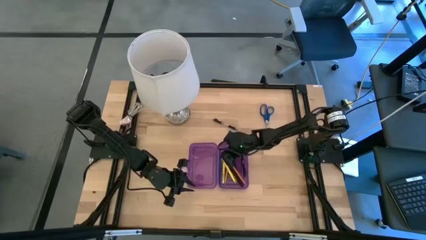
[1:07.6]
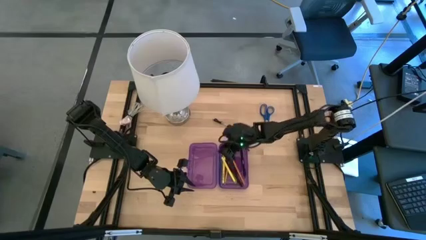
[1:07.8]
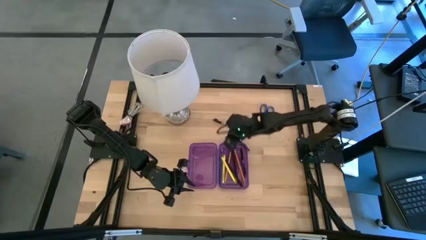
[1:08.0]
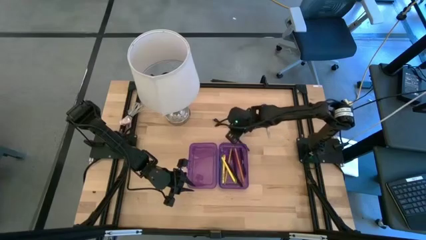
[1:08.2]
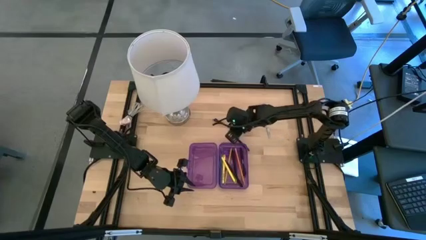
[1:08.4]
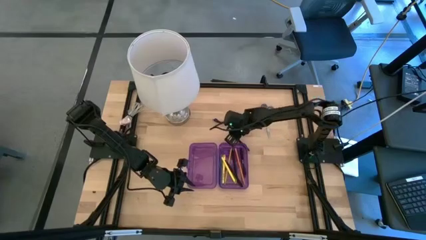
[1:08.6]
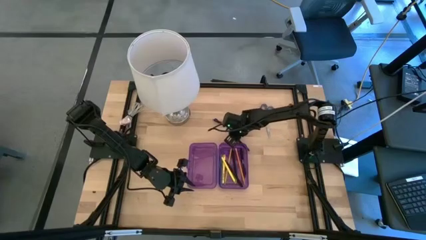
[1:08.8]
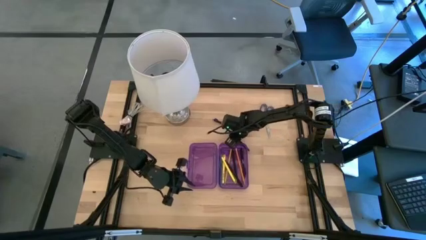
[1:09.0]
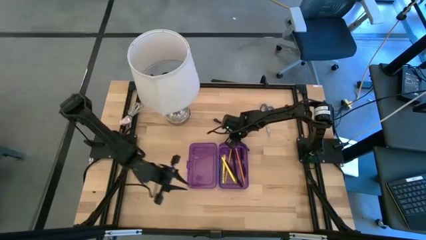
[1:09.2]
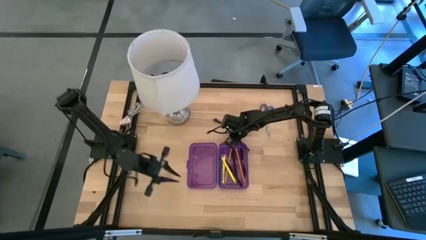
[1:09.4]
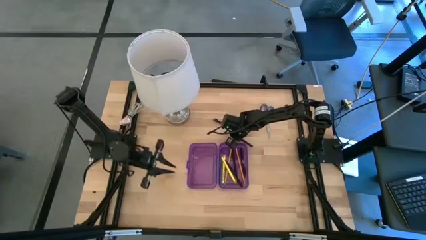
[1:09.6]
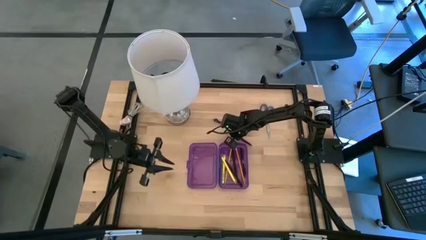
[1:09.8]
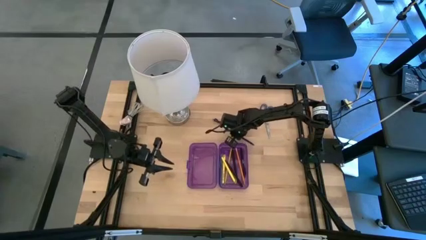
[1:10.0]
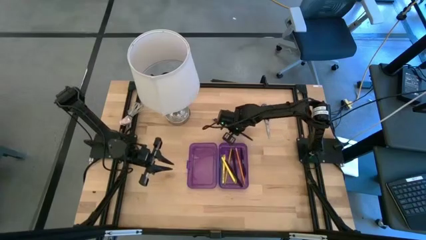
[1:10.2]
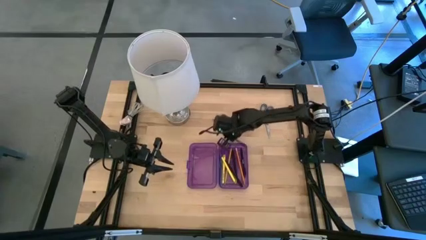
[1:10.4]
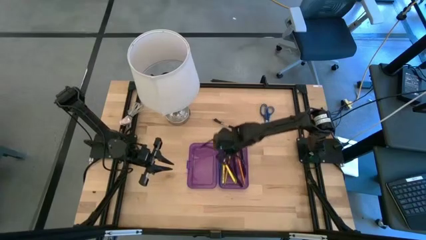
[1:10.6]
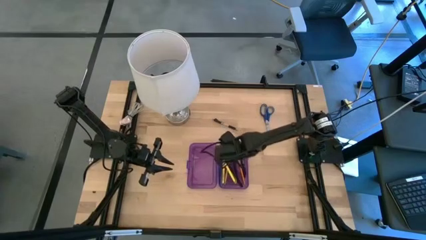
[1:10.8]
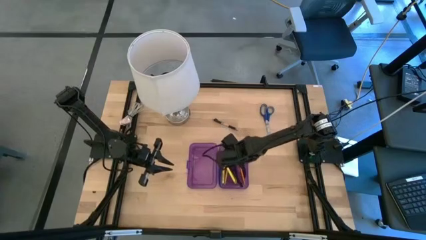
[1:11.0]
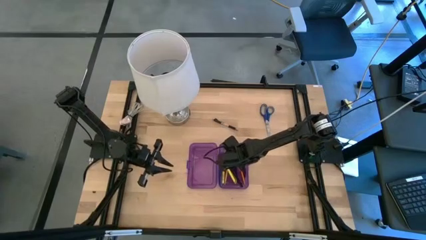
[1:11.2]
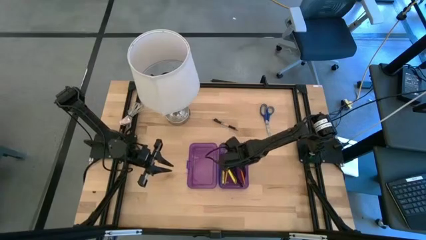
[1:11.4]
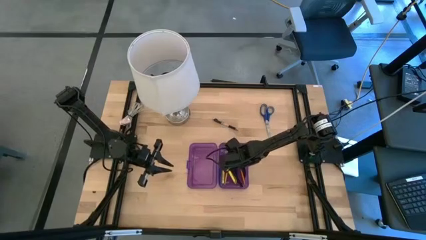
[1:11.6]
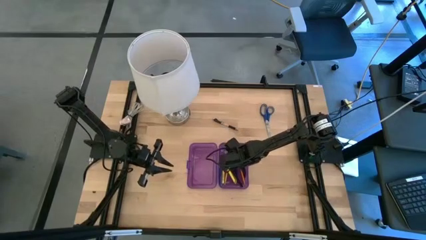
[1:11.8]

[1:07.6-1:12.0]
Task: Pick & place school supplies into a supply box
Put the black pen into the purple supply box

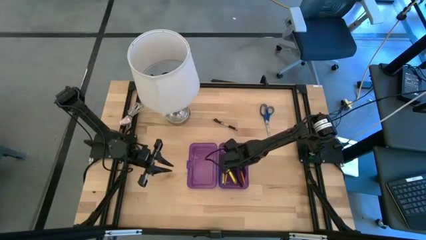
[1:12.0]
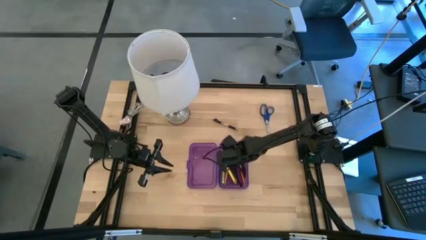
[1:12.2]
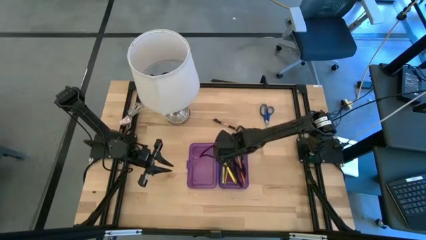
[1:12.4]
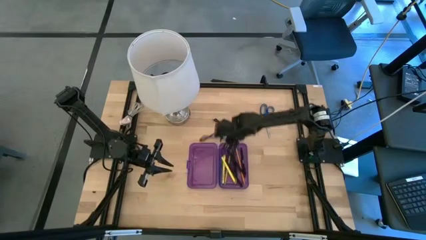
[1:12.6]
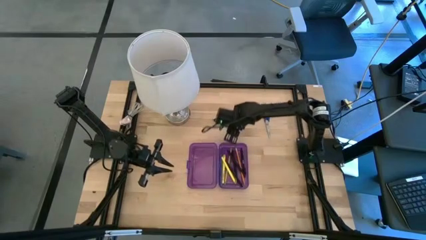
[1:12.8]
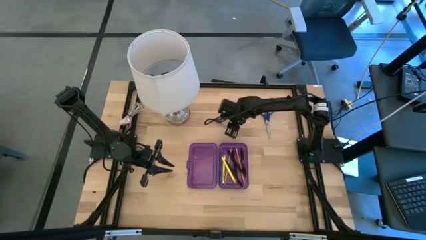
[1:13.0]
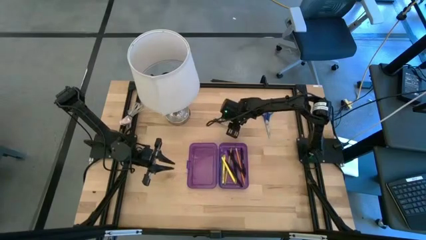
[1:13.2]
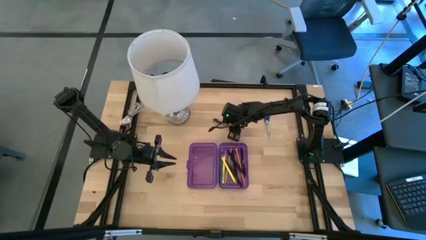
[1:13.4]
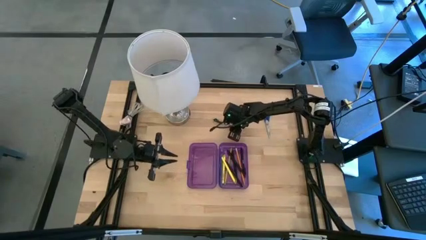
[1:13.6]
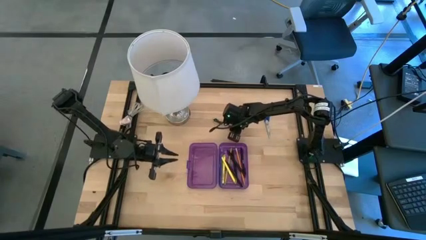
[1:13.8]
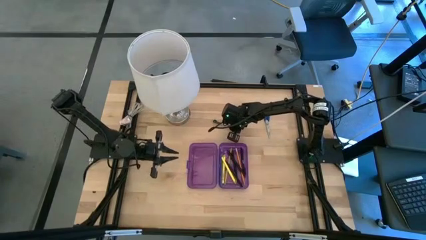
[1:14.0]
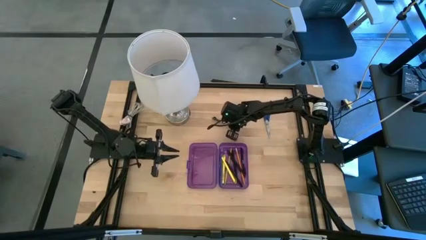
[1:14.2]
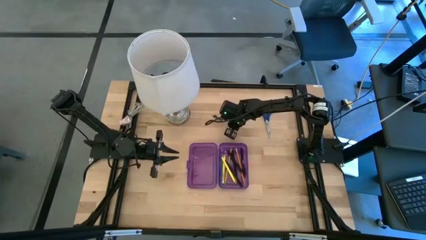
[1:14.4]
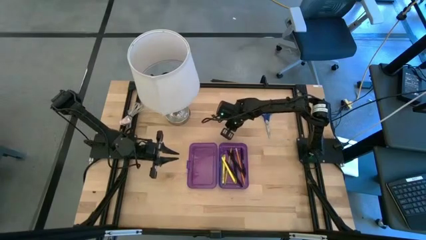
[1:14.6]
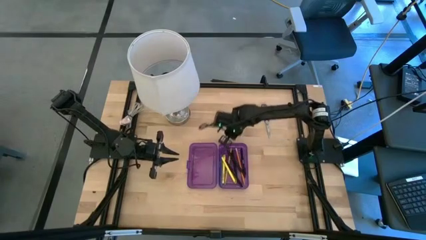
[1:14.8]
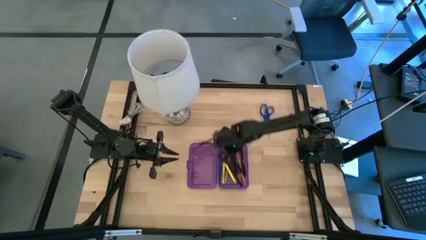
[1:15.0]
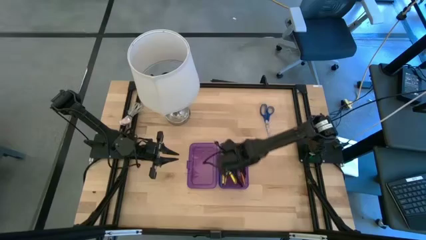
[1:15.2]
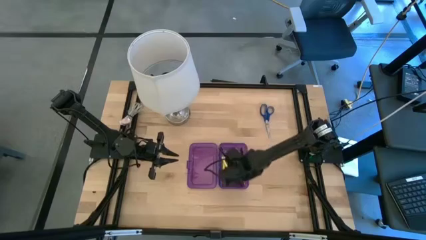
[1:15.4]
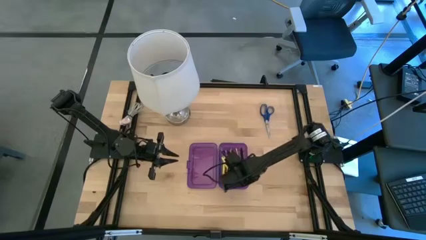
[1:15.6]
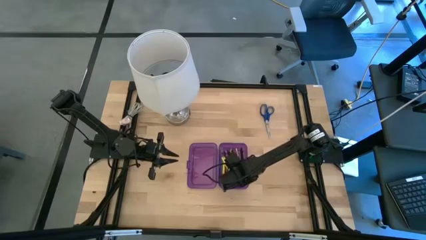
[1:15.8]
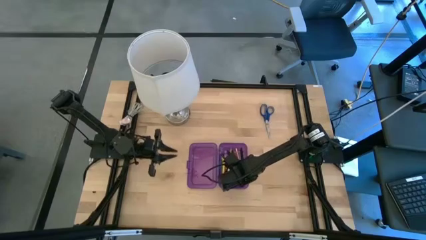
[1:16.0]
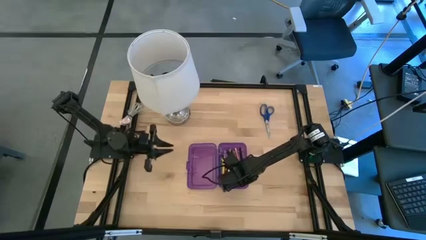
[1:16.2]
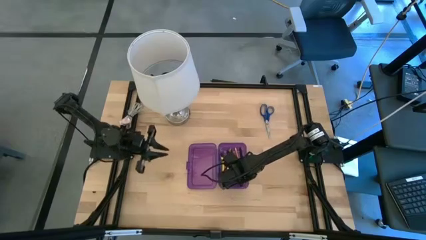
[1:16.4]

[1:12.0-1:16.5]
Put the transparent pen into the purple supply box

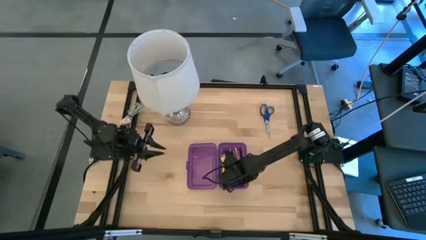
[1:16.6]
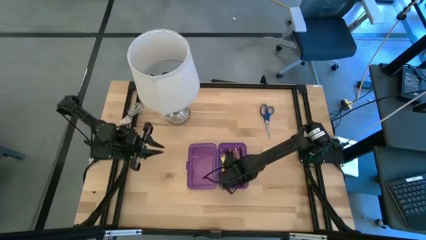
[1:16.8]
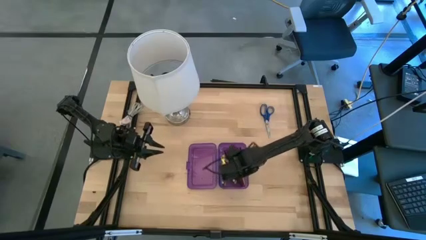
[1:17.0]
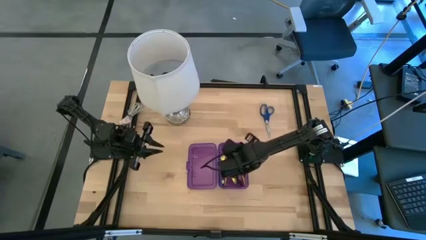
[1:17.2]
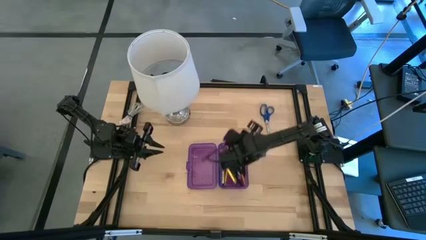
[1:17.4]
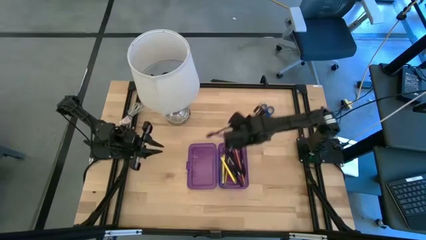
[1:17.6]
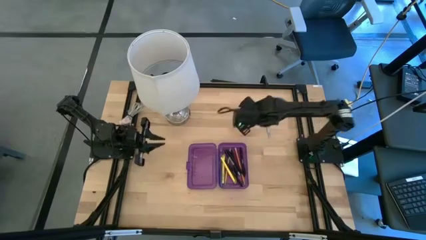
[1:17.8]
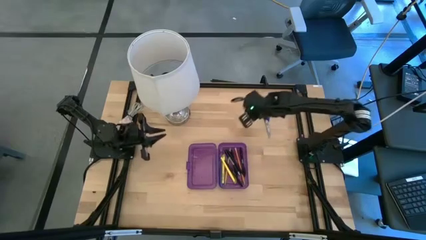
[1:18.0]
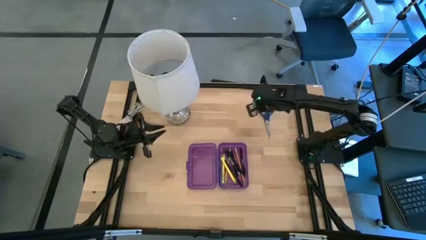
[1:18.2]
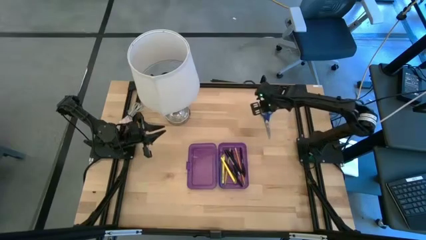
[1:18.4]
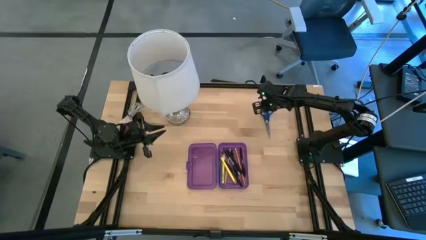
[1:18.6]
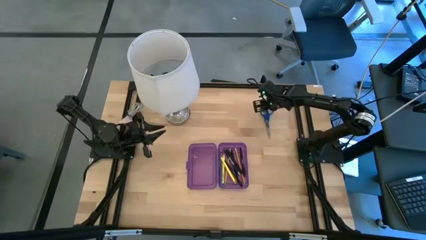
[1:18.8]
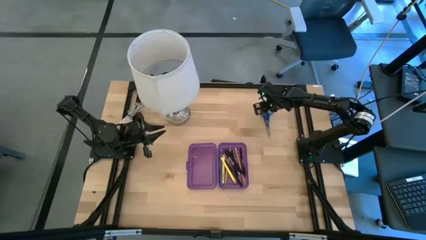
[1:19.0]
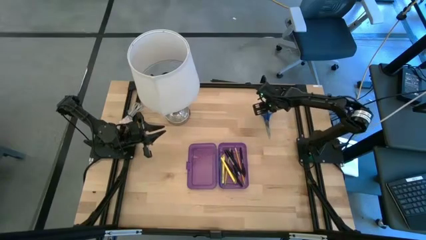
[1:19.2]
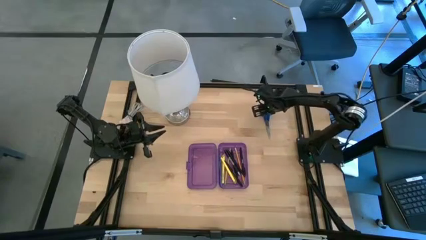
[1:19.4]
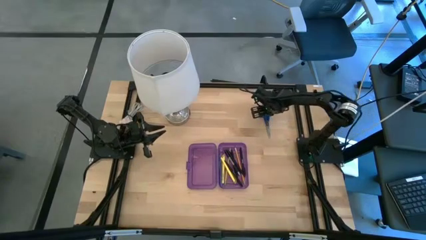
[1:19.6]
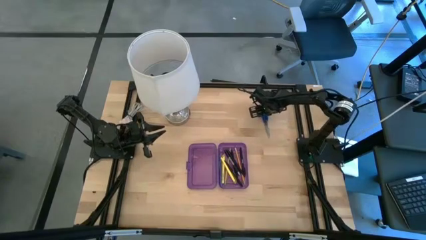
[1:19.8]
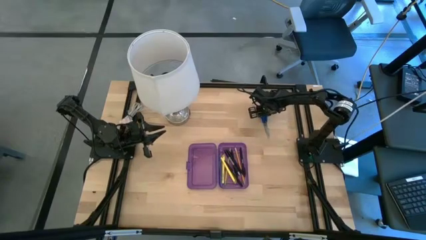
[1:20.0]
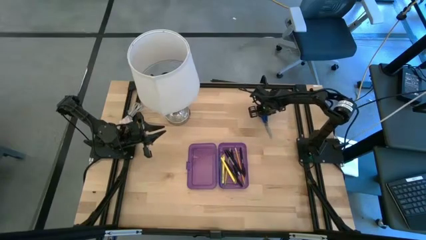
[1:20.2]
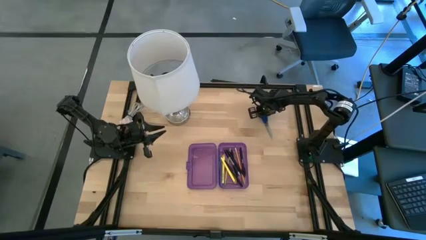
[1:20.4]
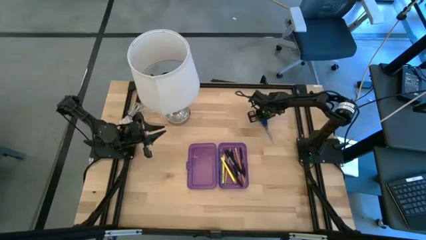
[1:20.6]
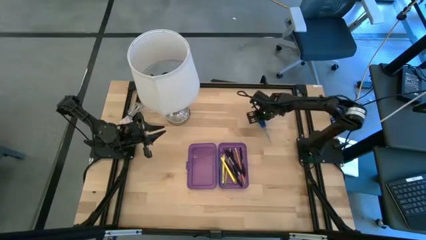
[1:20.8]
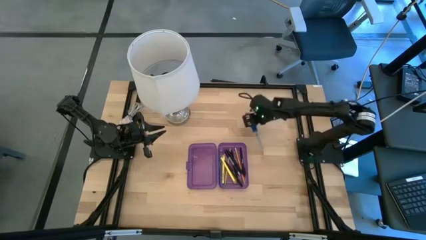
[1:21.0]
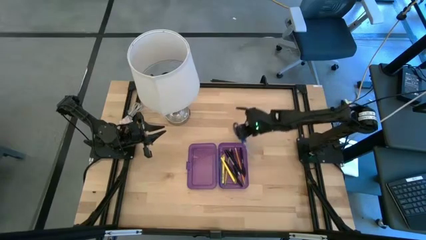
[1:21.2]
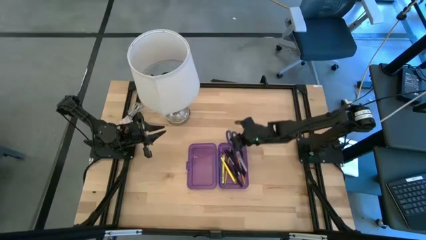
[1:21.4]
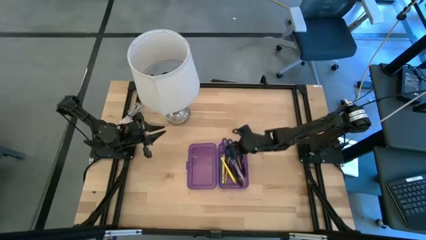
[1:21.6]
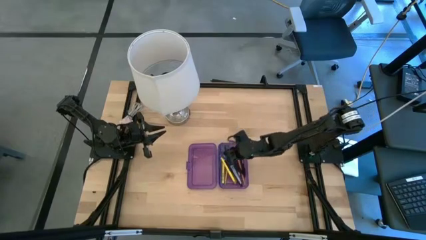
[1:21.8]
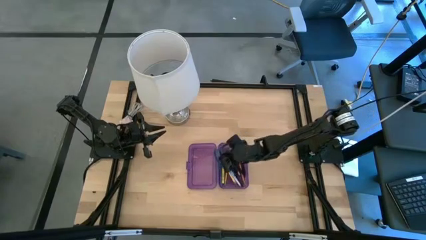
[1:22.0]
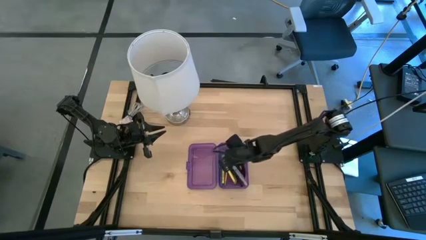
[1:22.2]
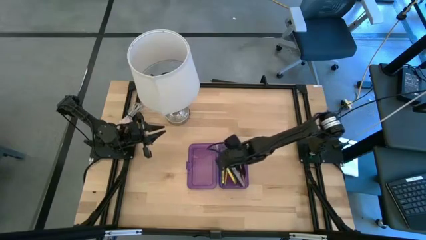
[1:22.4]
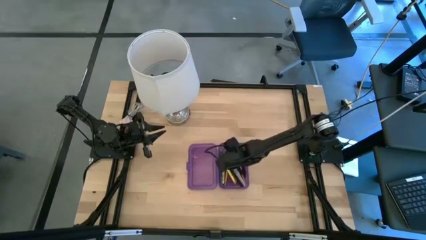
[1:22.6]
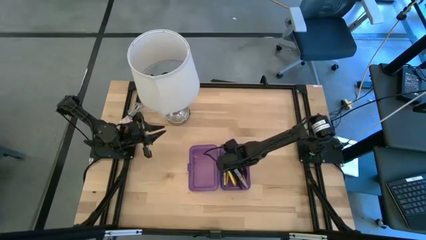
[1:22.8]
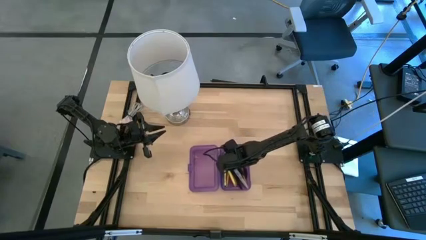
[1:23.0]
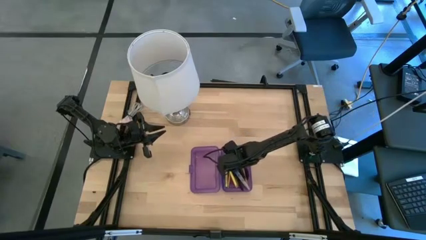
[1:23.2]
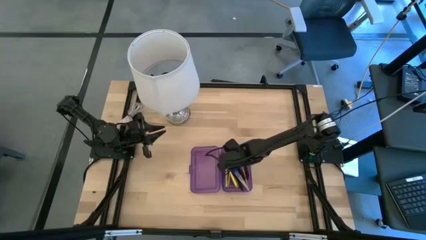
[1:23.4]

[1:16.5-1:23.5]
Put the blue scissors into the purple supply box

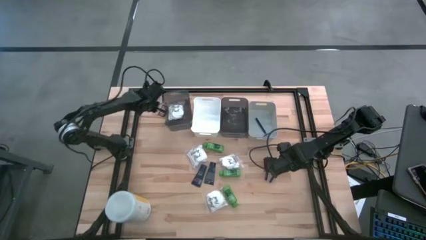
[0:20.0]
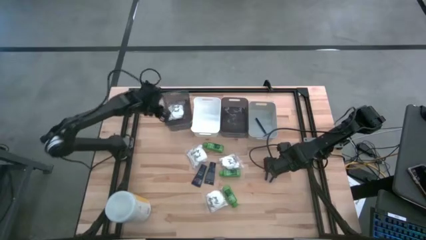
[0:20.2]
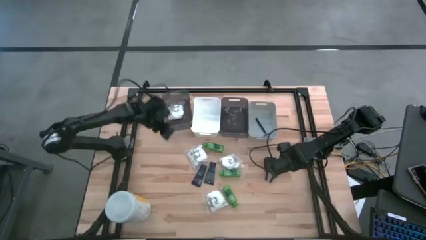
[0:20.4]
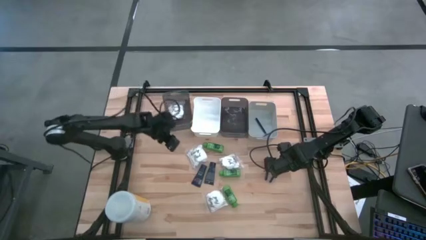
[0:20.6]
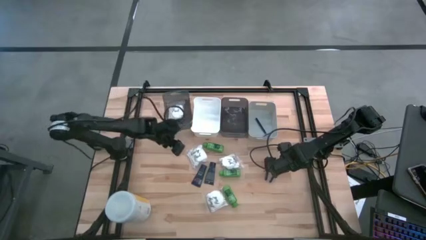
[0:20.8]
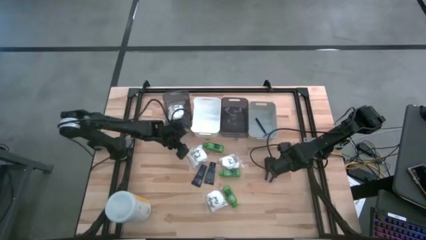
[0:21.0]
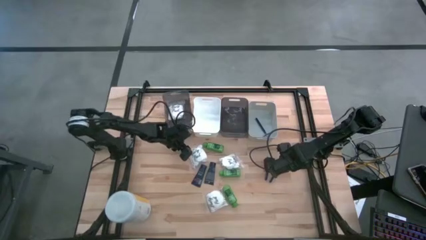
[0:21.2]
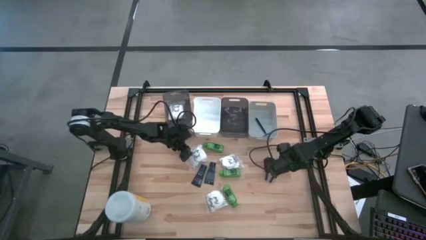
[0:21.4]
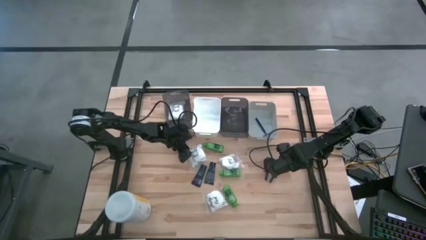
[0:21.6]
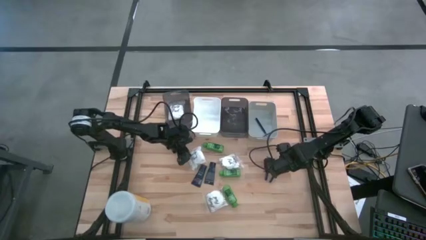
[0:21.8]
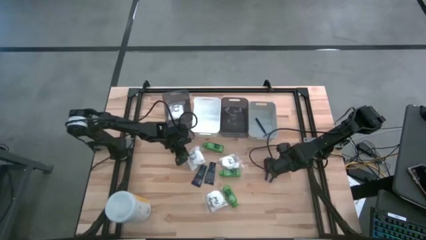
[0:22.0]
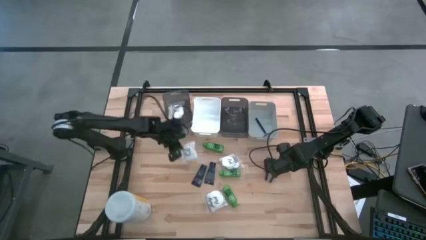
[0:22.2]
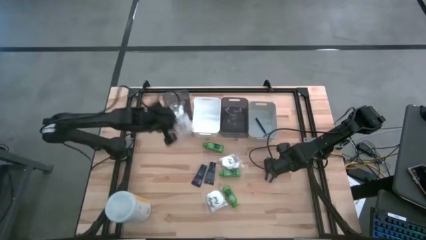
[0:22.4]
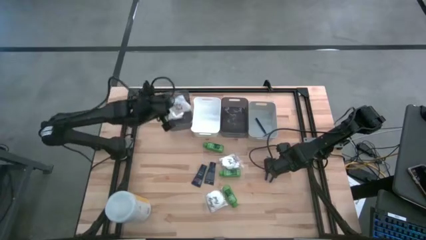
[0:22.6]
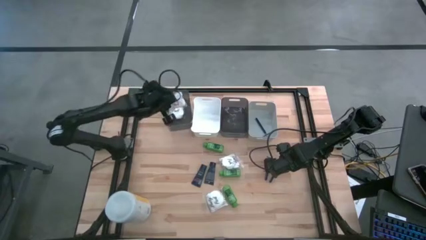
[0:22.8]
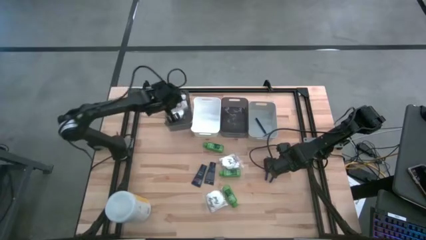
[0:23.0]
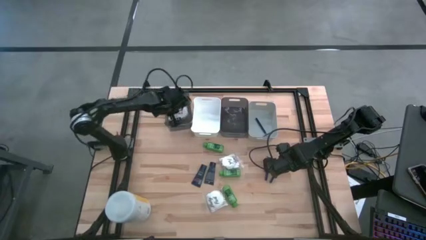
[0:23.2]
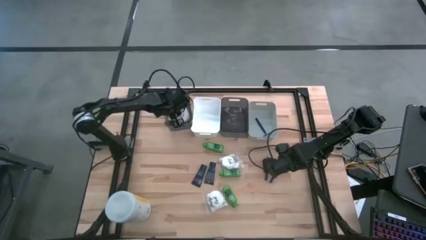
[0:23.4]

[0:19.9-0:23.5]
Task: Pick & Place Travel size toiletries
Put the top cotton pack into the left black bin
